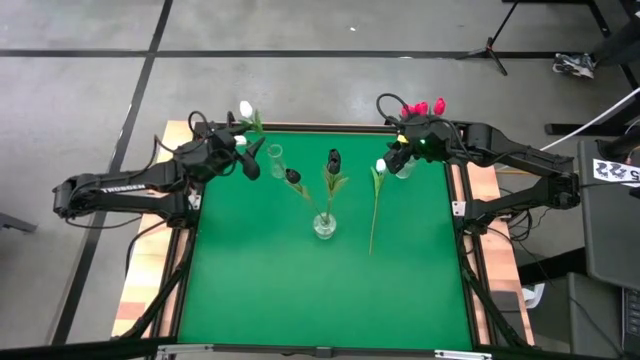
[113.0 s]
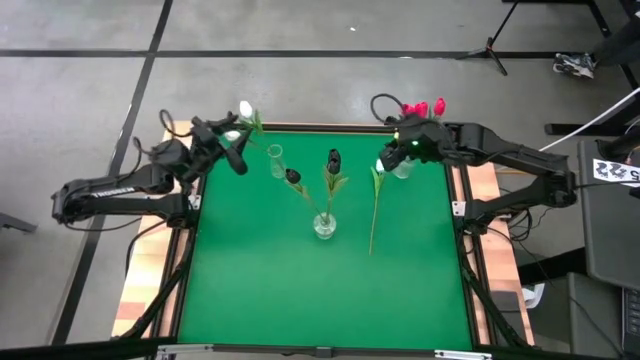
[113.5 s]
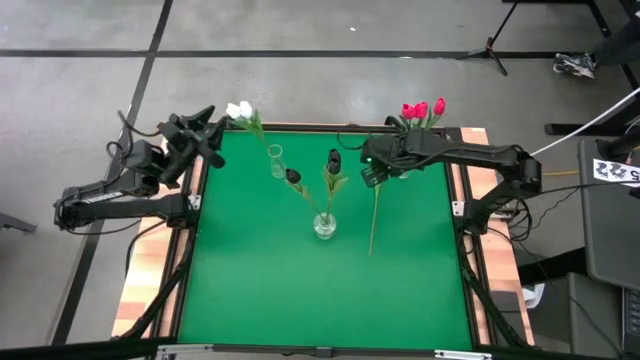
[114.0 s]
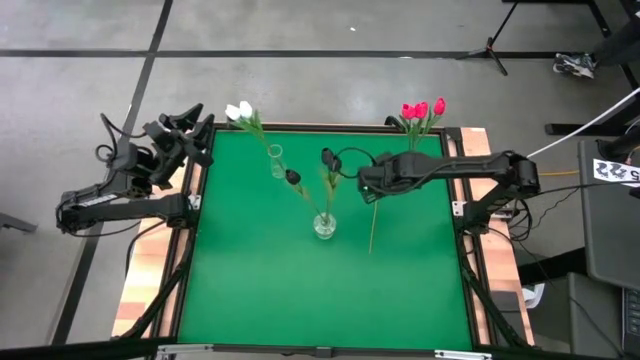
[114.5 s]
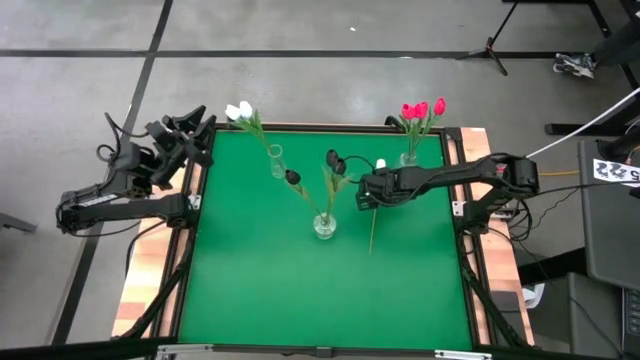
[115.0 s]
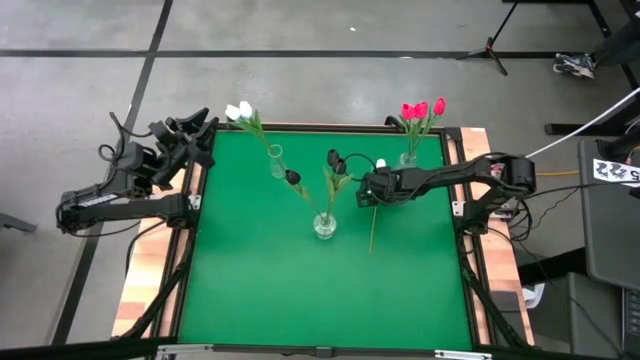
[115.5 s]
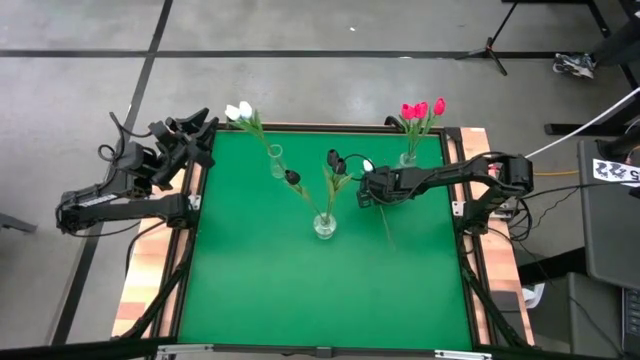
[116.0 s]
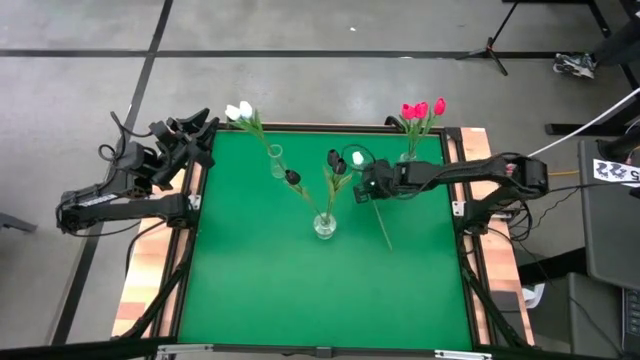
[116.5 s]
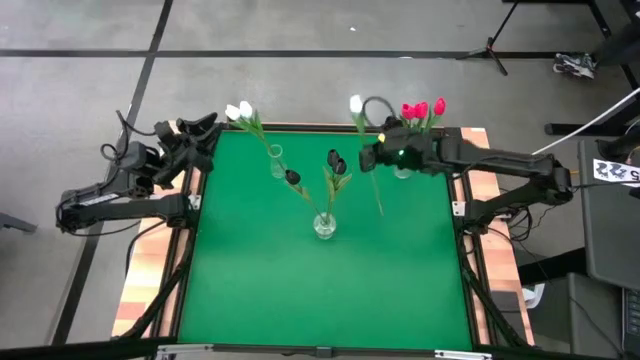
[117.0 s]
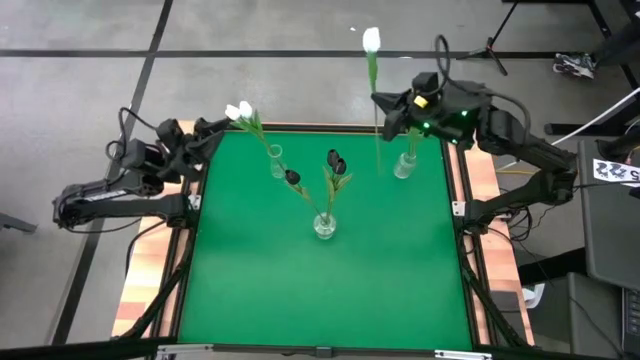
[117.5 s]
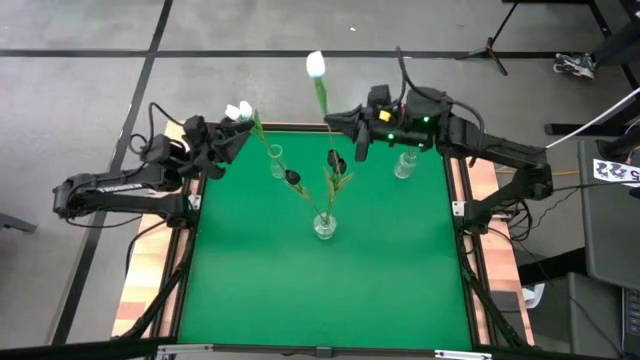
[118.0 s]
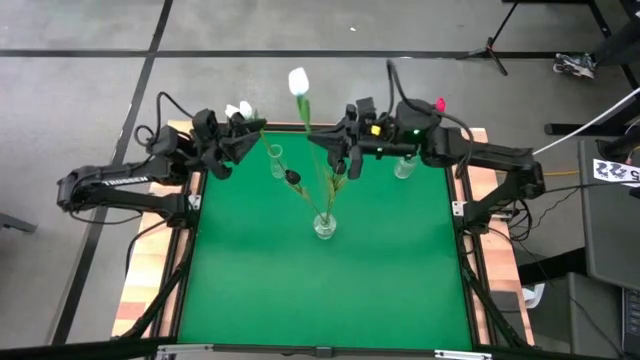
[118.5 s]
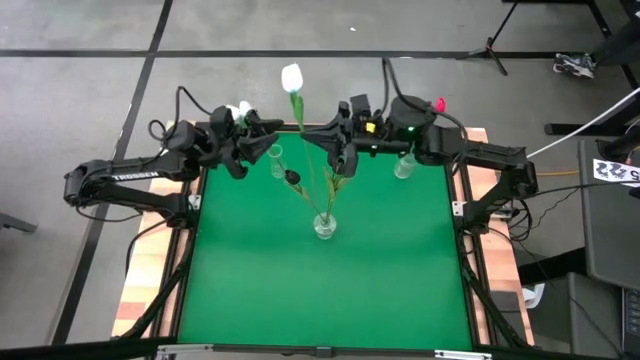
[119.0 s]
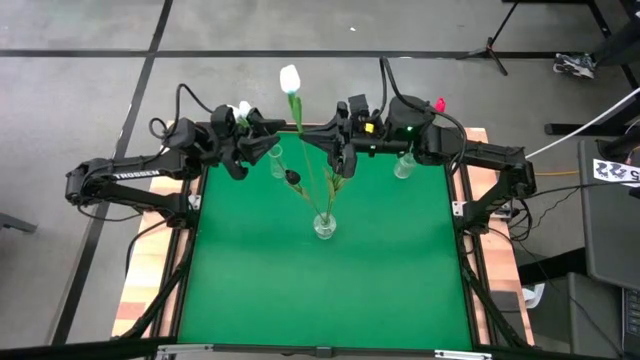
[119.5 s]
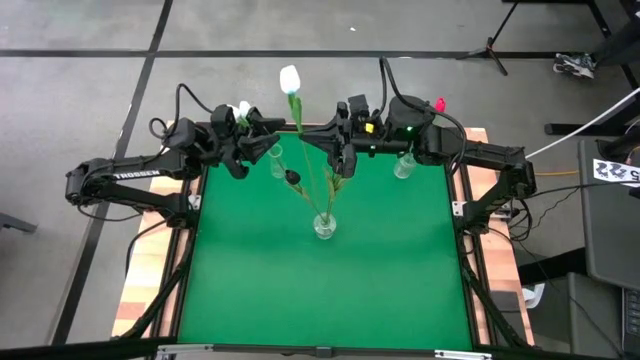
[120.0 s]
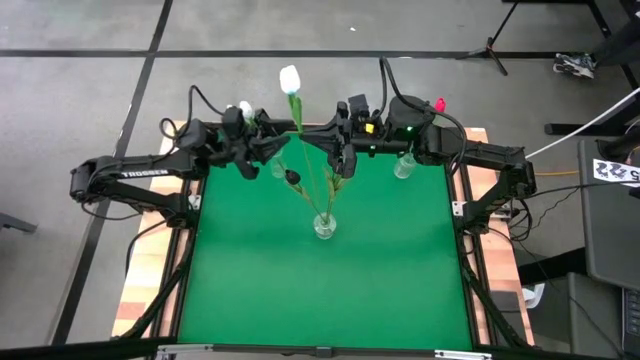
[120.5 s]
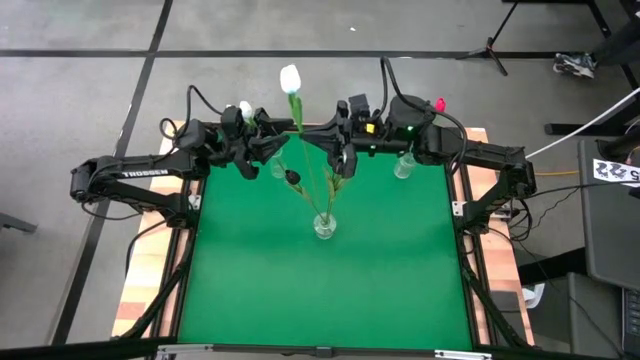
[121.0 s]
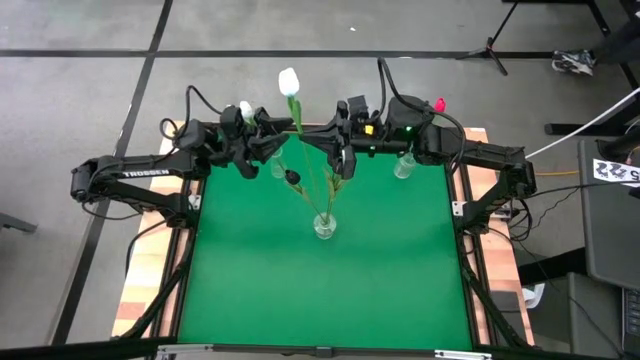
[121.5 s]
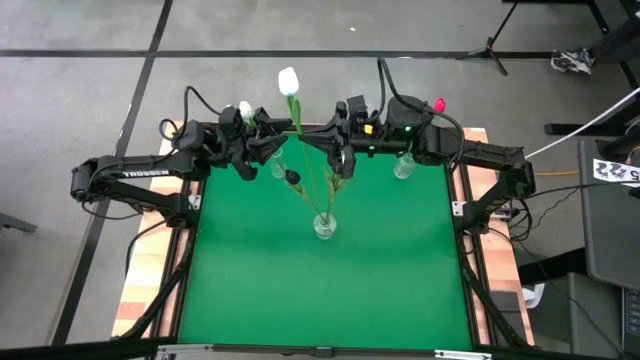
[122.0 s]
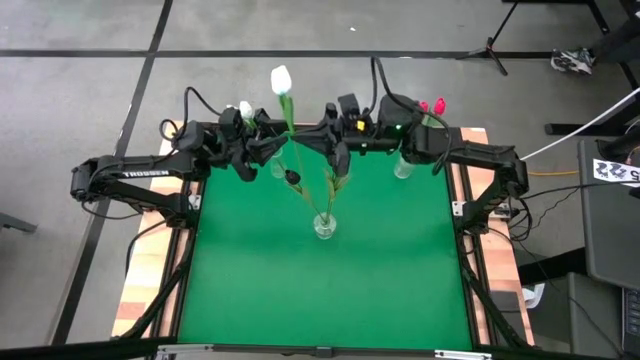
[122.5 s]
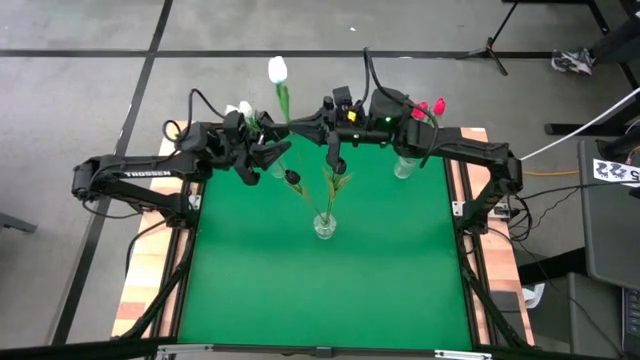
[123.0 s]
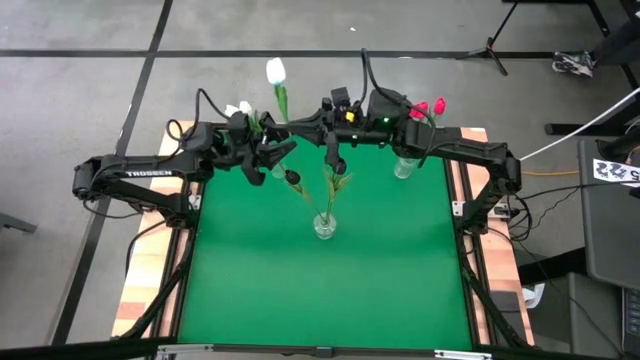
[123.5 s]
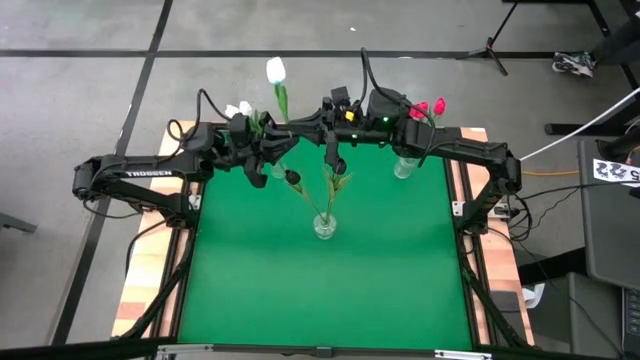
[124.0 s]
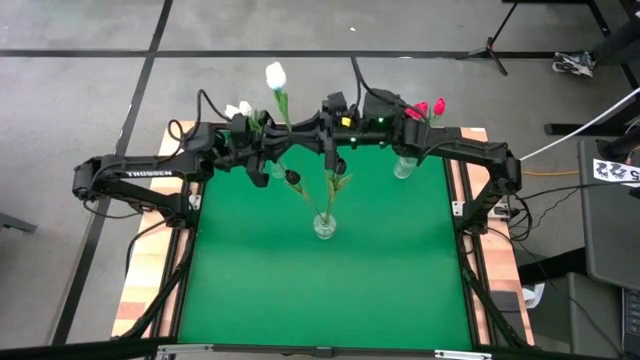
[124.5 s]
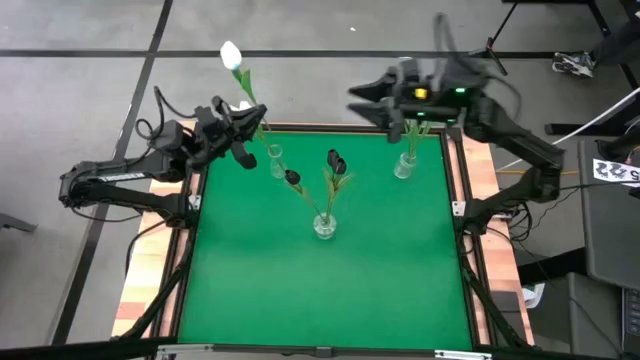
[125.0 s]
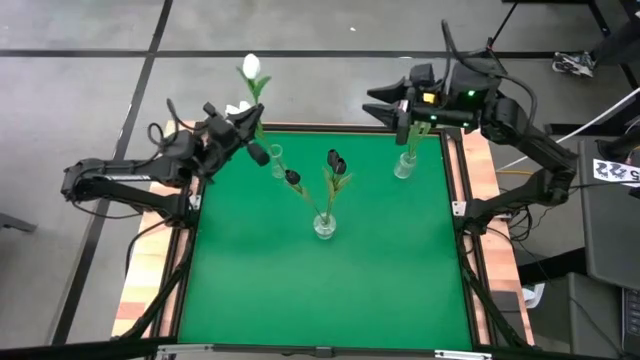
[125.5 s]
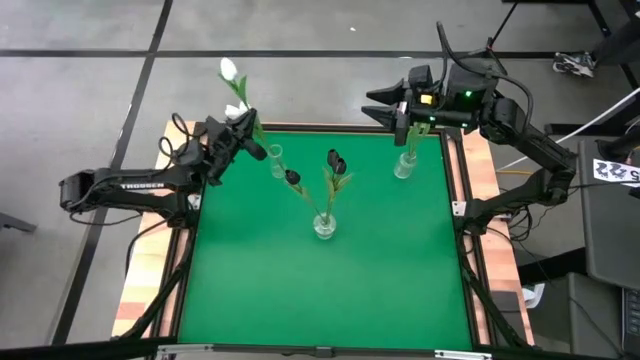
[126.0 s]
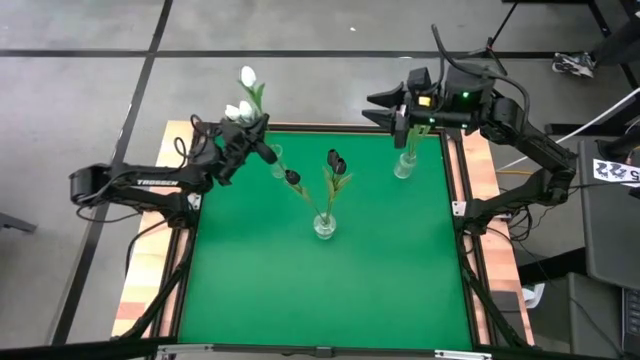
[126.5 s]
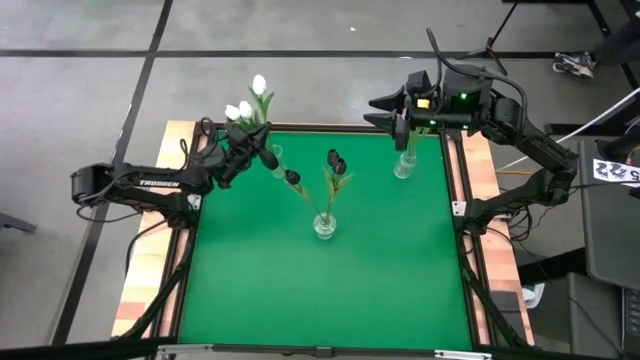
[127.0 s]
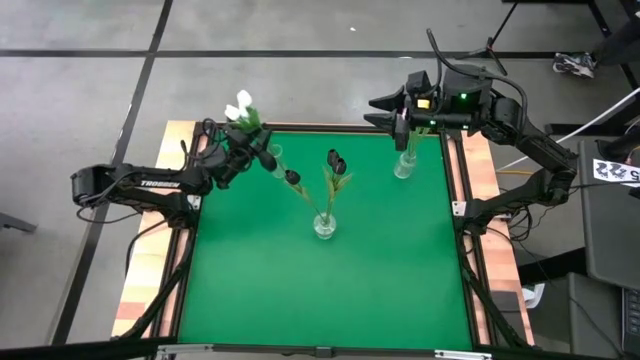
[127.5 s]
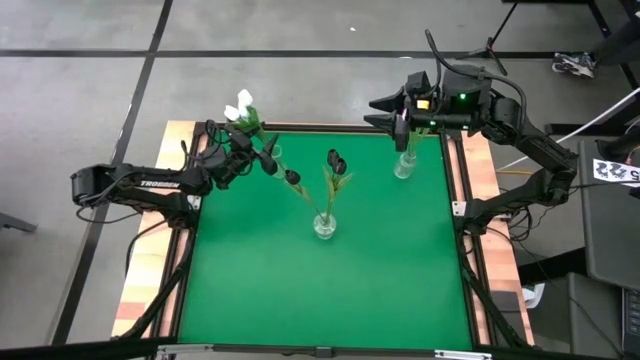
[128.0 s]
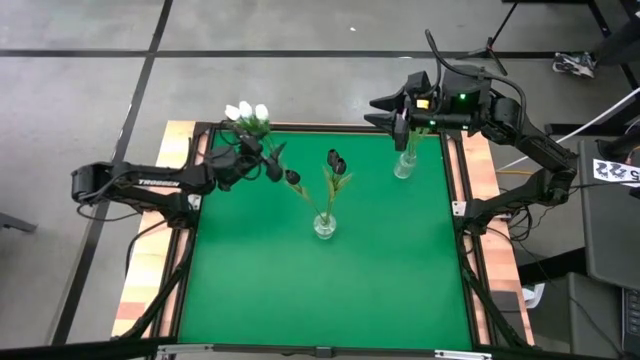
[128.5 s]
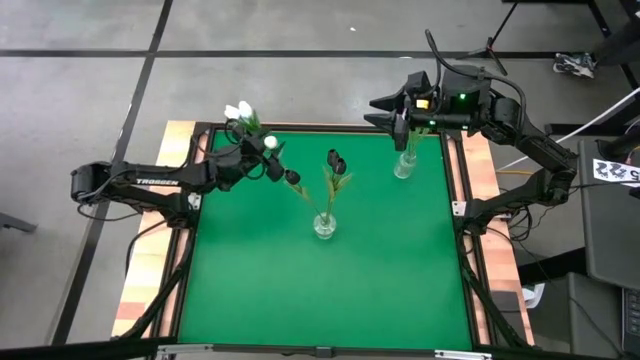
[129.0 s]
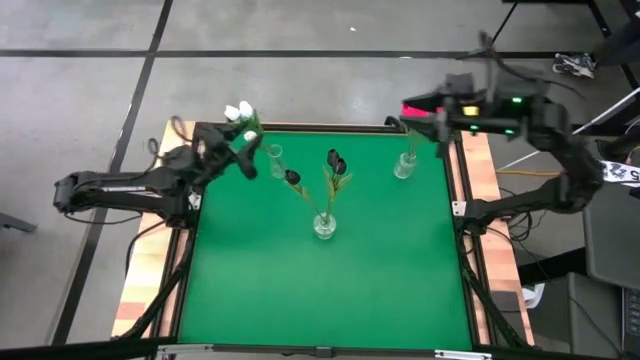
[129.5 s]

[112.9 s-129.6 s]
Task: Sort flowers into vase by color
Put the white tulip into the top left transparent vase

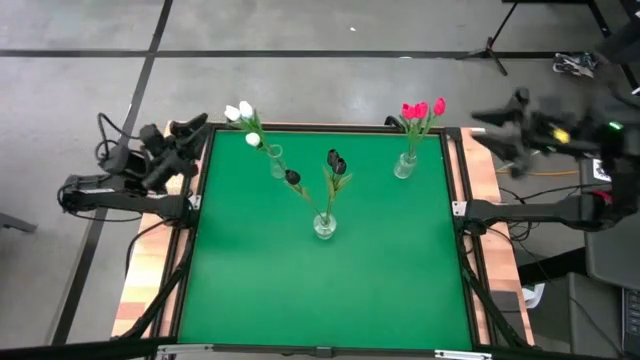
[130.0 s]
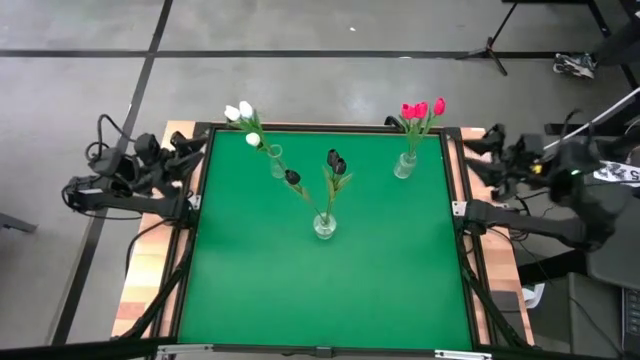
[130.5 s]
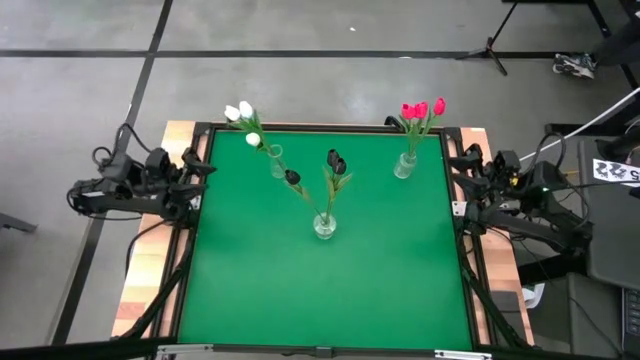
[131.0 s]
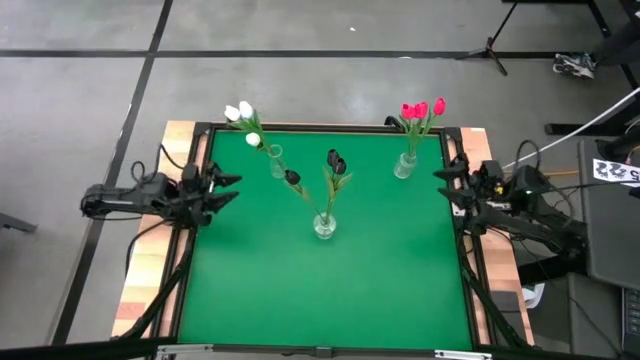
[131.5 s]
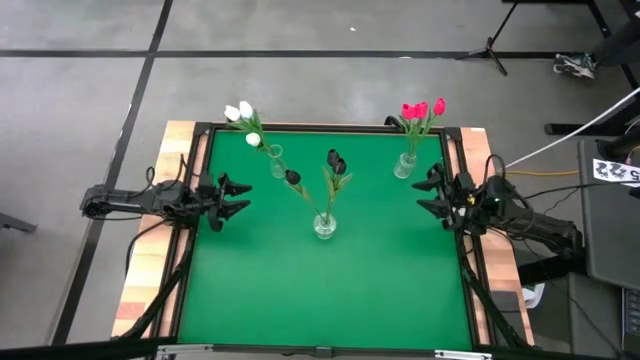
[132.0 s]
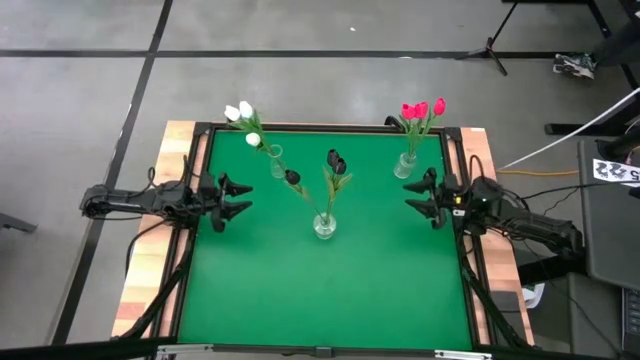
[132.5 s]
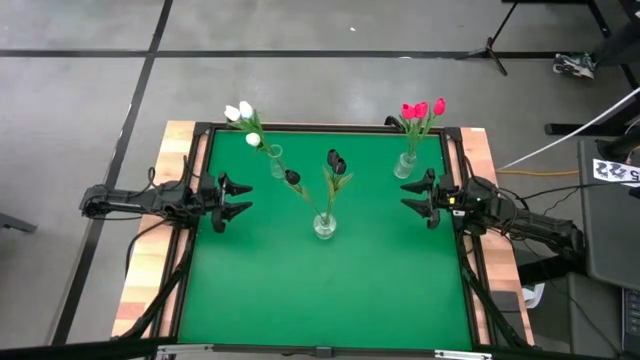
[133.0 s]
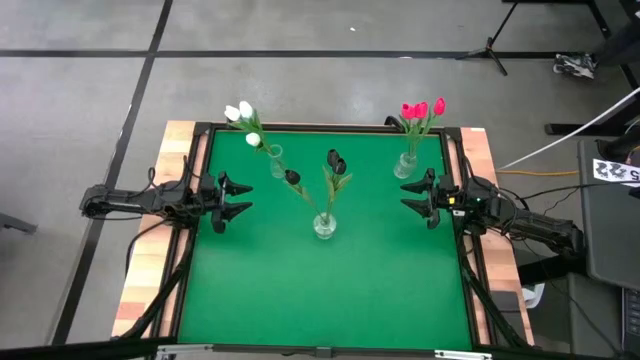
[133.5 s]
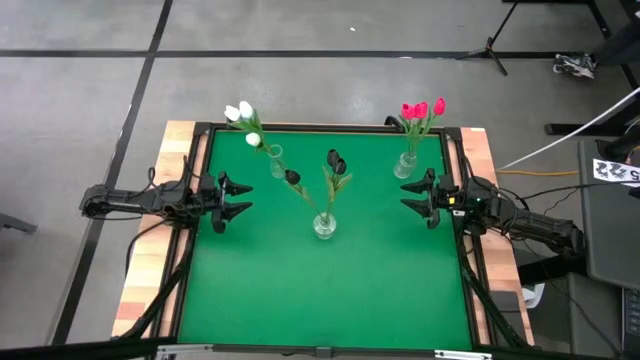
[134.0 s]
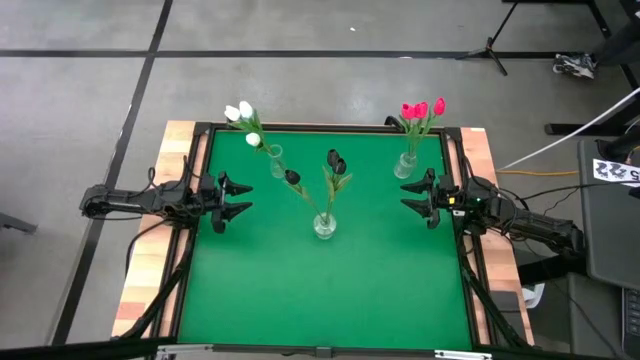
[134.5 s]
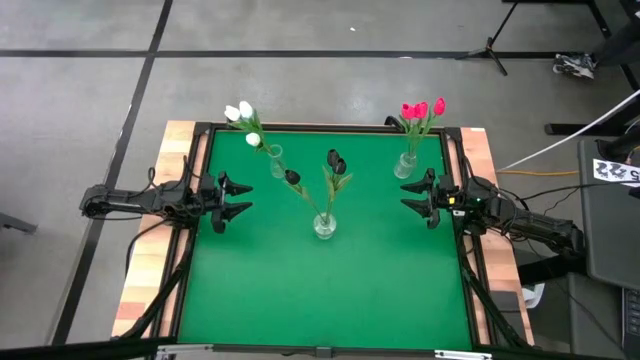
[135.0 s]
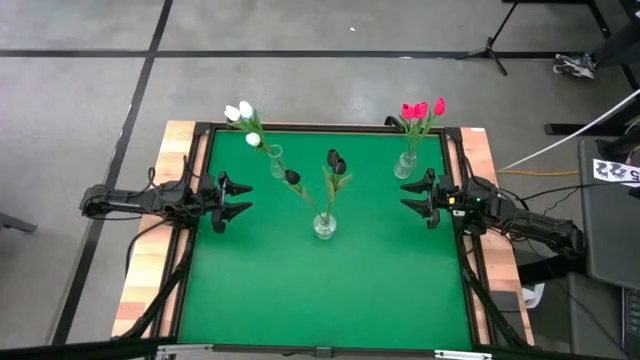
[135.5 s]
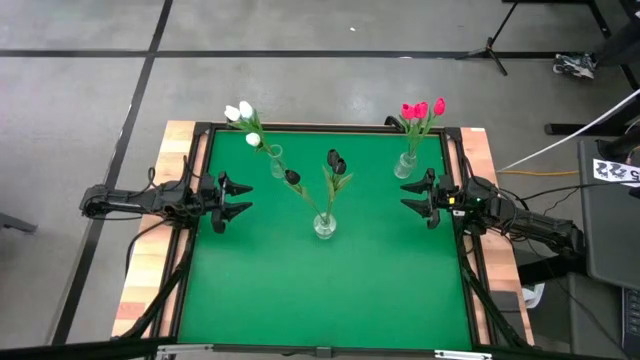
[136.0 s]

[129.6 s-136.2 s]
Return to Home Position
